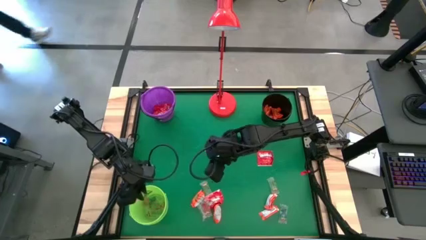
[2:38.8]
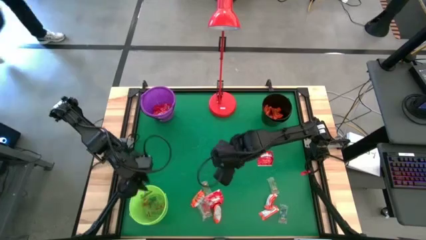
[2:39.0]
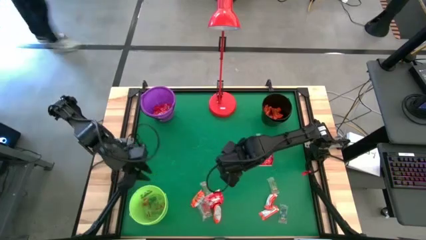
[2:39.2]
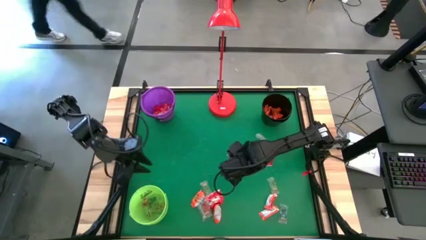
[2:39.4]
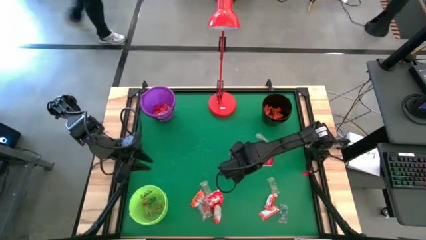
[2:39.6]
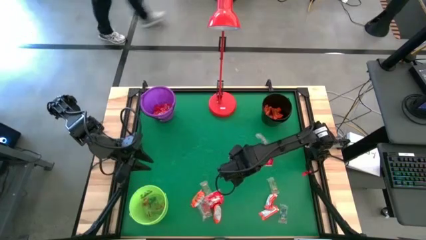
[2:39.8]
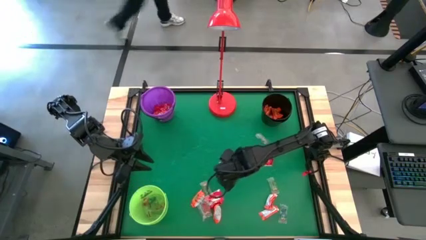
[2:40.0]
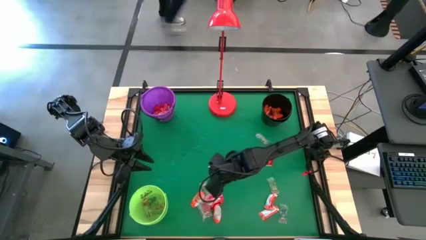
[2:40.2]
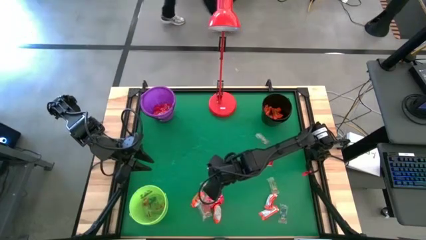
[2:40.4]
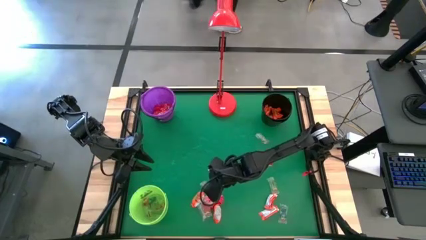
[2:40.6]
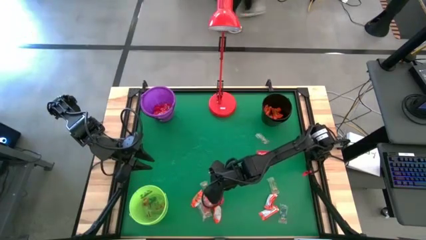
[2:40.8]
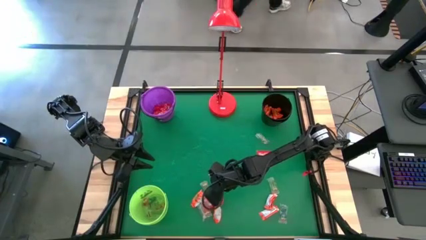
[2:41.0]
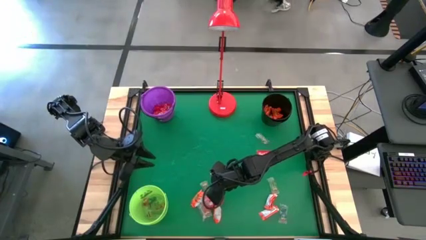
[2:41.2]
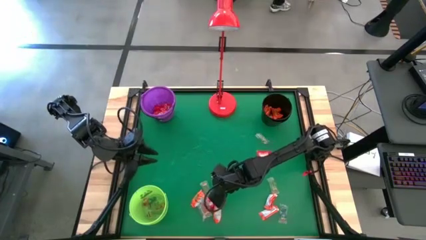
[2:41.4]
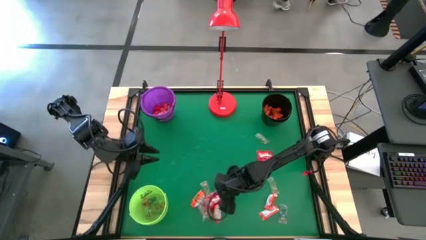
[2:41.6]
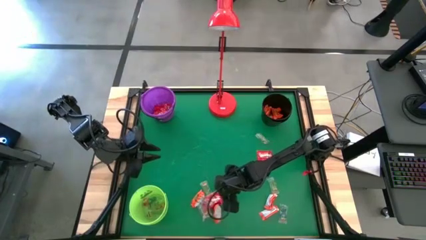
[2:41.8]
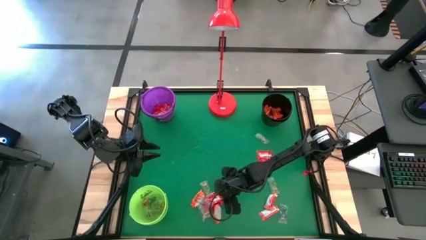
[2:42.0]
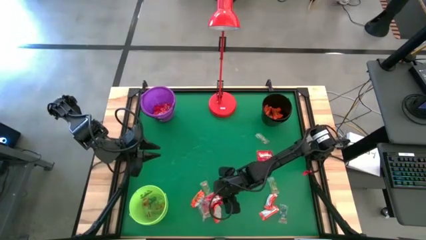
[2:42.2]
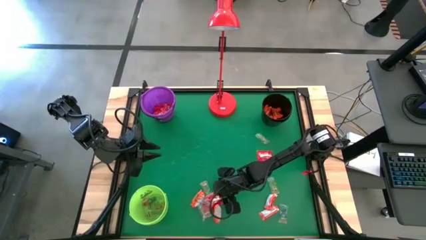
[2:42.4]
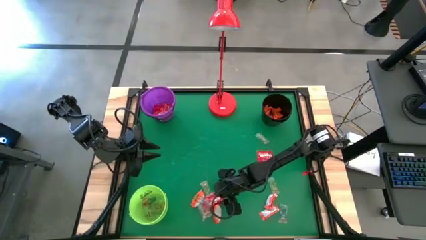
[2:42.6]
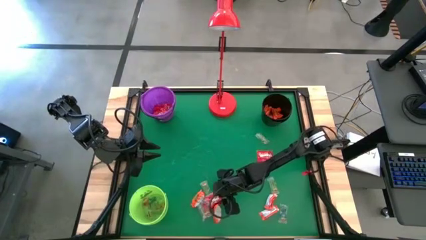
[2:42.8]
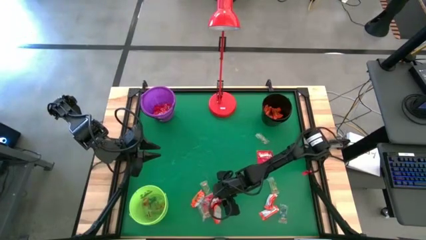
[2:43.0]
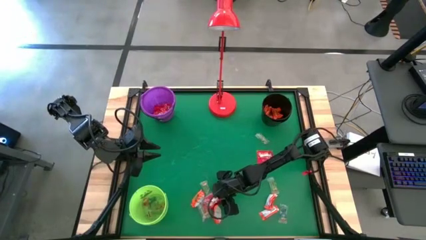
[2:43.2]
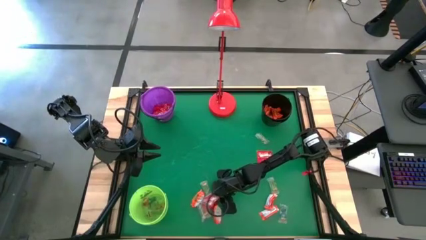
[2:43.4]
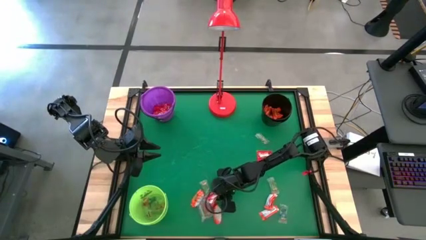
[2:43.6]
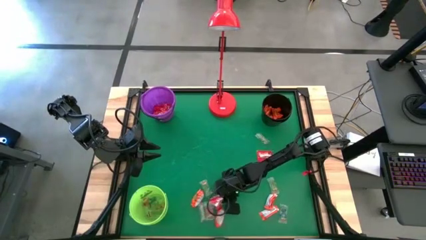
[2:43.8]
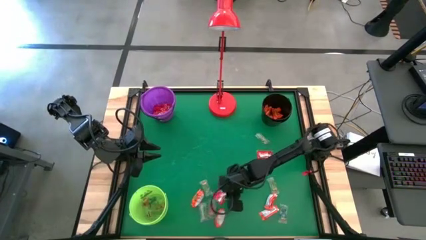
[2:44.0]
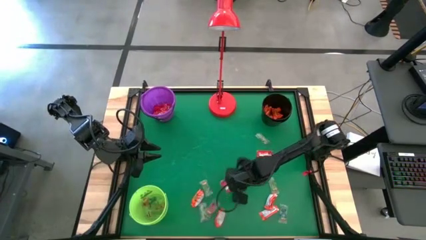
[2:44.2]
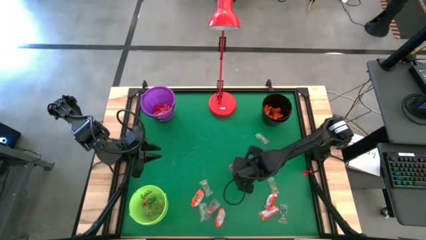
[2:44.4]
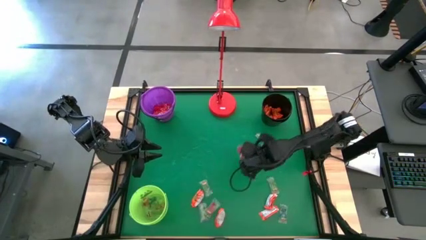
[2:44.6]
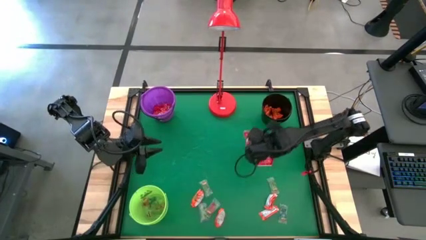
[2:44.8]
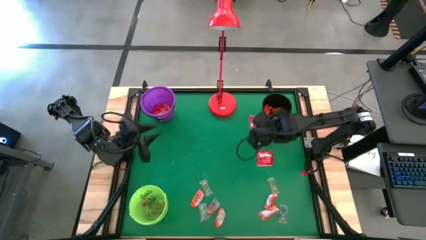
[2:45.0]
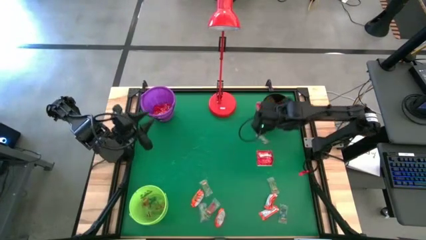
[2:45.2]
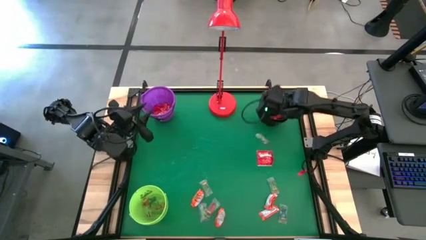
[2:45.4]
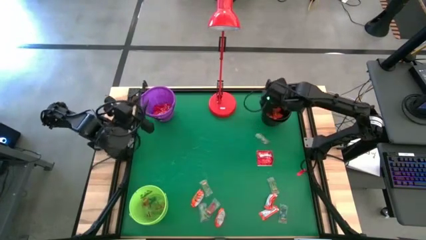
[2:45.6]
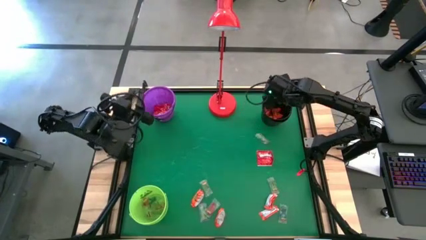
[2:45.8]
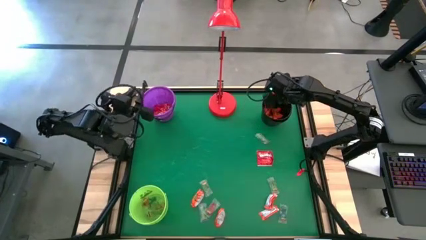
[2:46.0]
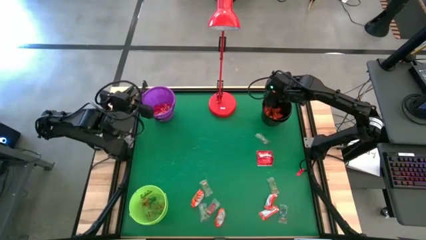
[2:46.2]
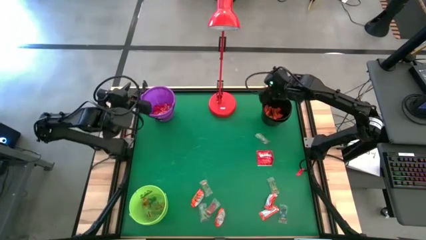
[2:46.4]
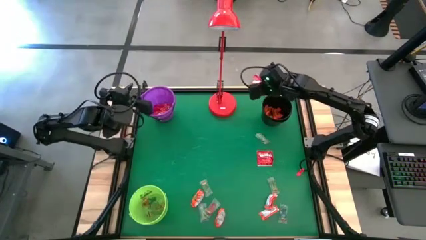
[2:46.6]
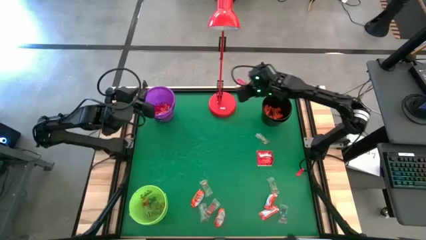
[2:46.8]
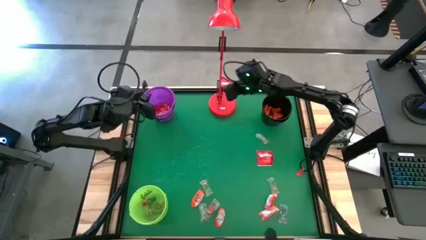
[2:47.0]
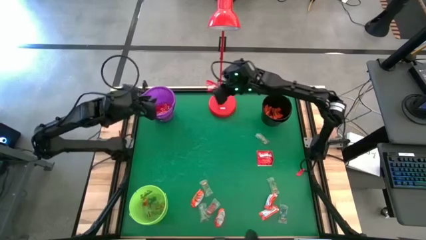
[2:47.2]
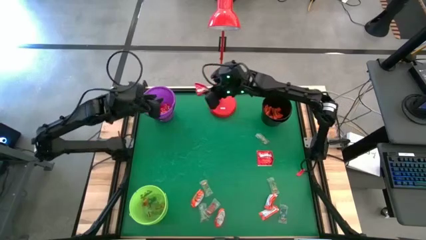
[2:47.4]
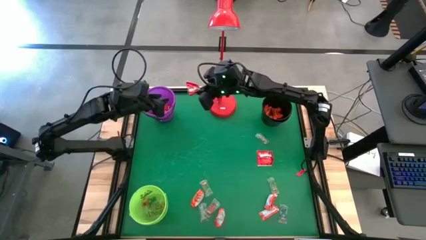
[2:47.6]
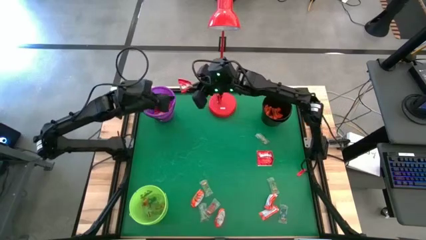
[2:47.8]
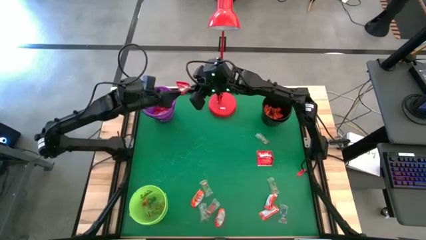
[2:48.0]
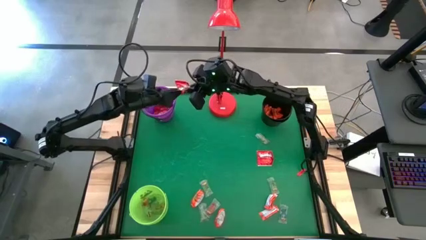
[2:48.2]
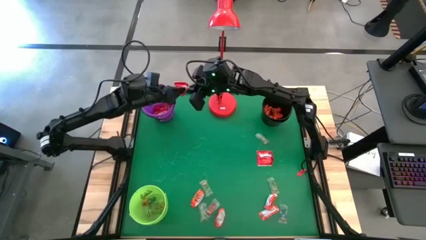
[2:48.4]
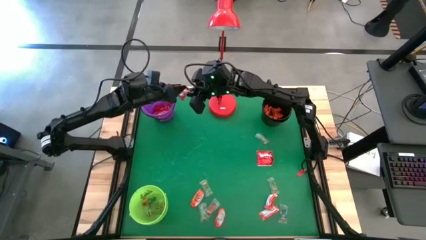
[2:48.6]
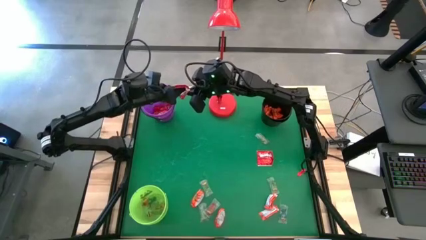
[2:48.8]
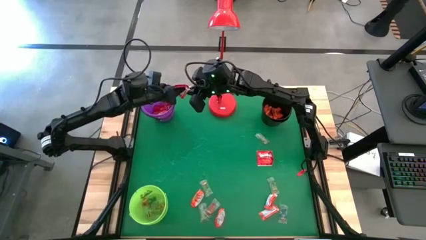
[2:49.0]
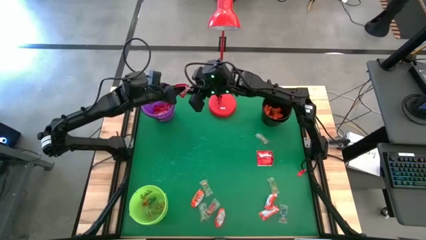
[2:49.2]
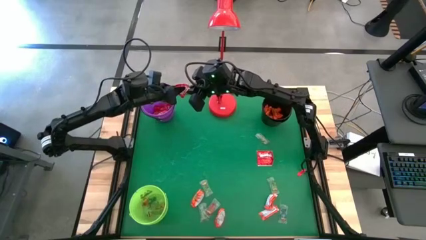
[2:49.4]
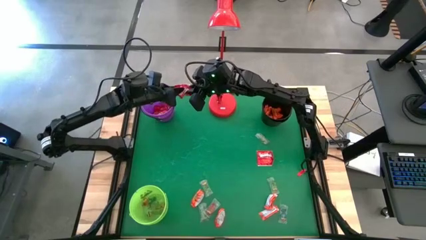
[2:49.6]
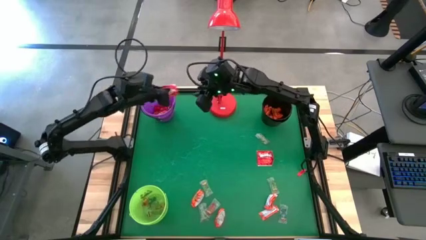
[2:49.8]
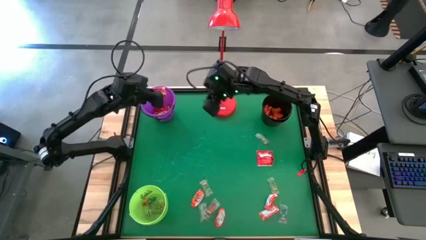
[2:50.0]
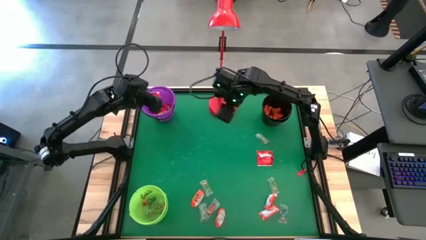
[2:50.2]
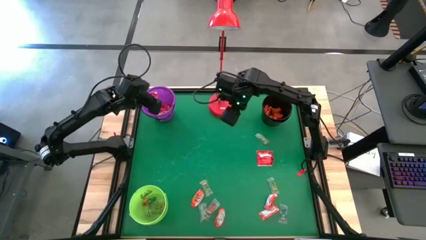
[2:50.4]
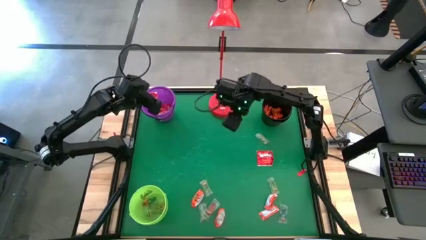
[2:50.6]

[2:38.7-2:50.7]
Task: Sort candy
Put the red candy into the violet bucket

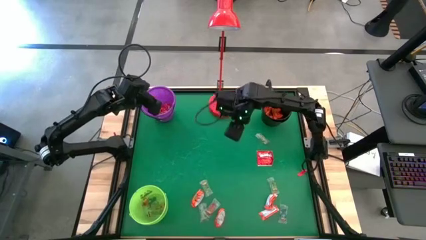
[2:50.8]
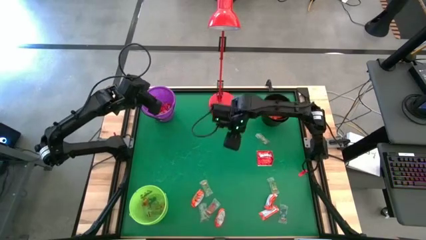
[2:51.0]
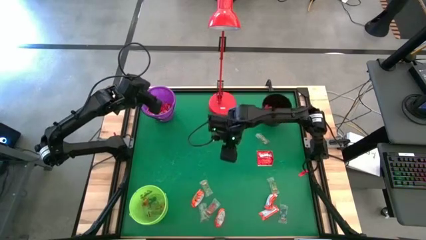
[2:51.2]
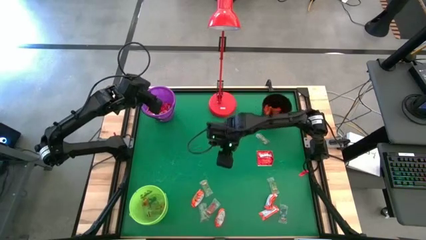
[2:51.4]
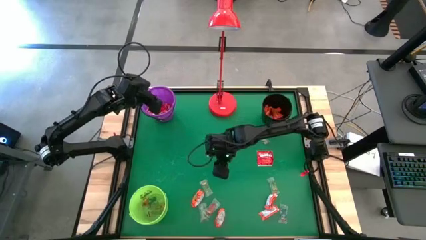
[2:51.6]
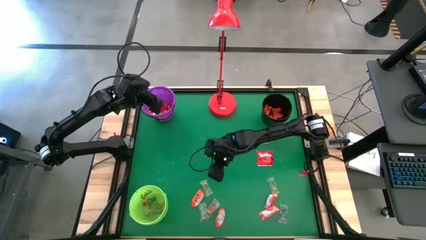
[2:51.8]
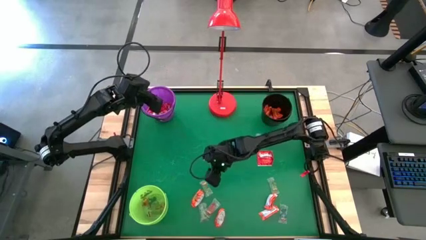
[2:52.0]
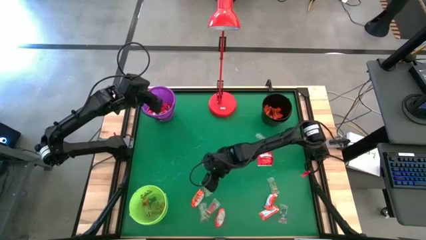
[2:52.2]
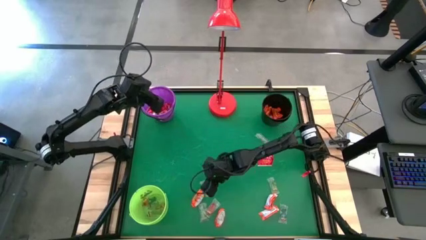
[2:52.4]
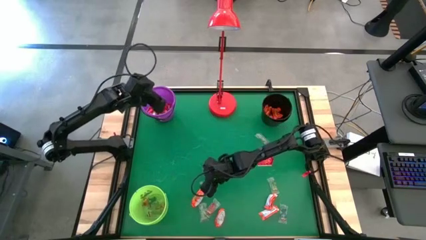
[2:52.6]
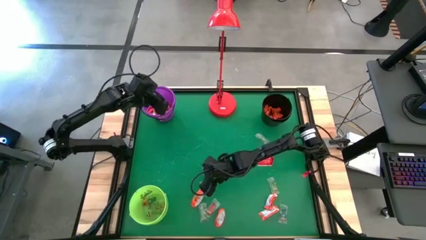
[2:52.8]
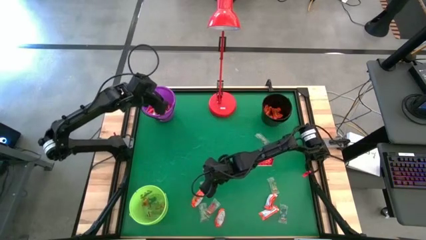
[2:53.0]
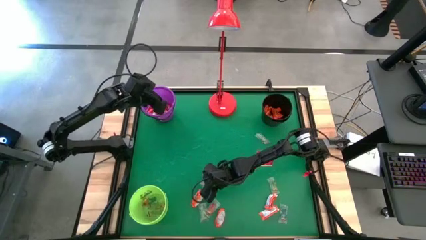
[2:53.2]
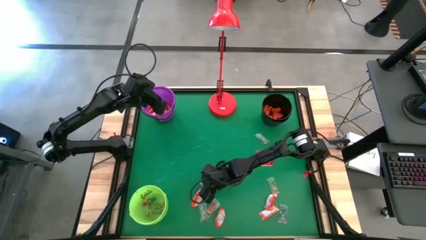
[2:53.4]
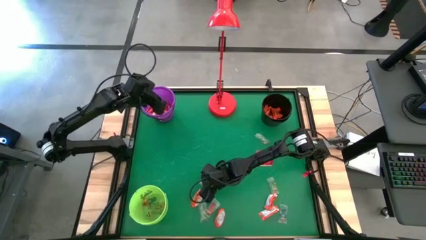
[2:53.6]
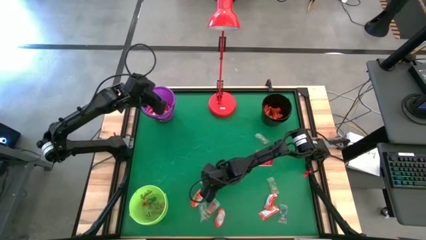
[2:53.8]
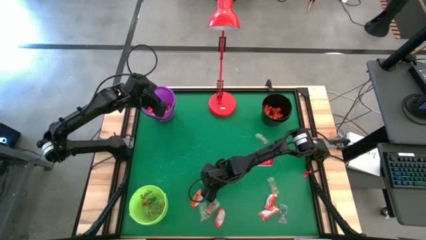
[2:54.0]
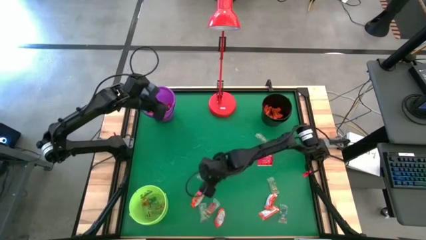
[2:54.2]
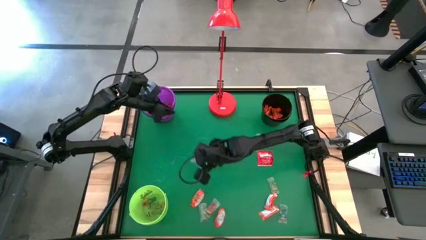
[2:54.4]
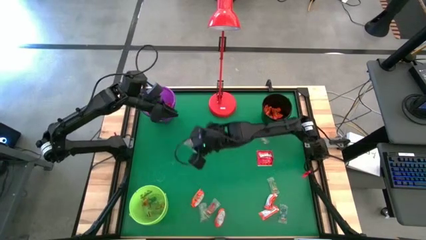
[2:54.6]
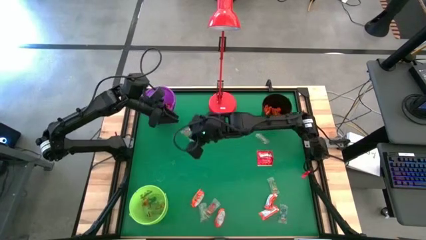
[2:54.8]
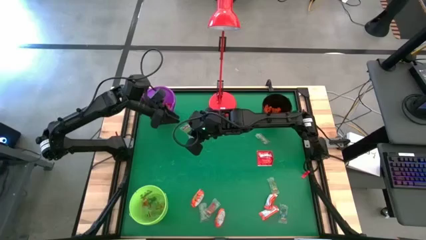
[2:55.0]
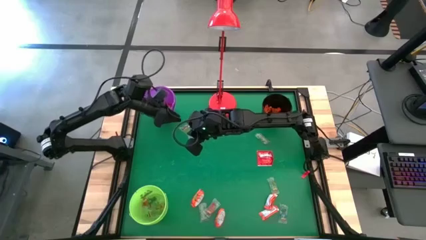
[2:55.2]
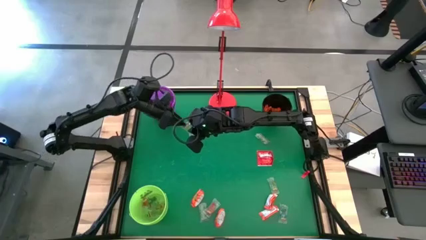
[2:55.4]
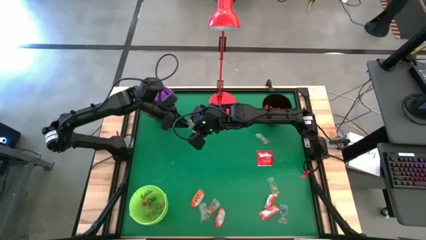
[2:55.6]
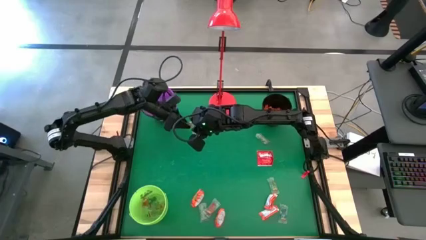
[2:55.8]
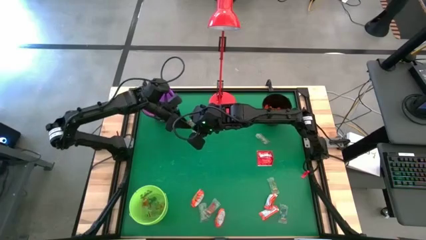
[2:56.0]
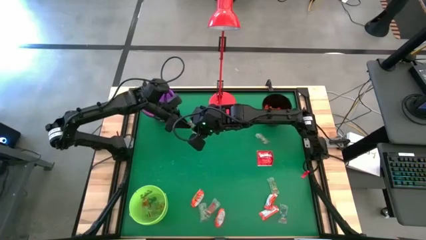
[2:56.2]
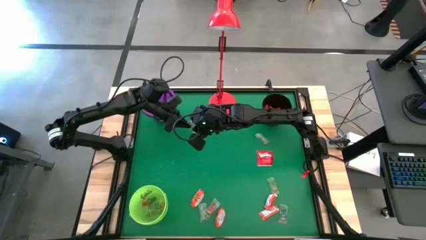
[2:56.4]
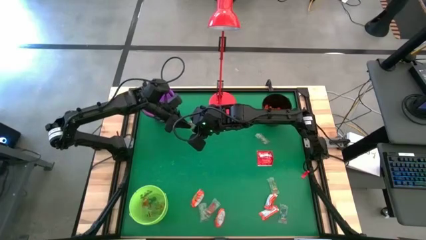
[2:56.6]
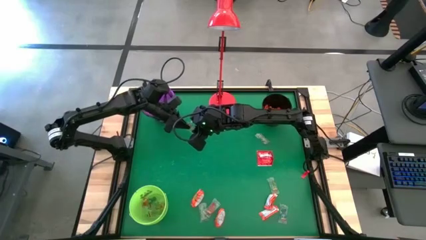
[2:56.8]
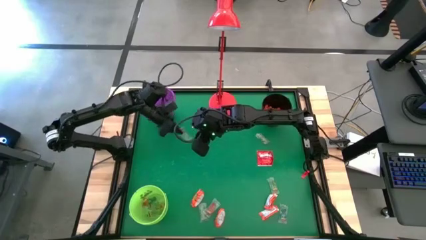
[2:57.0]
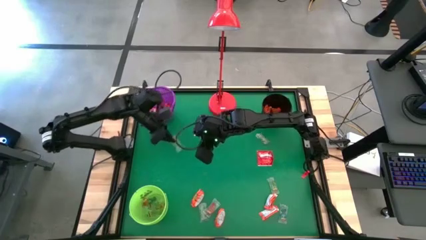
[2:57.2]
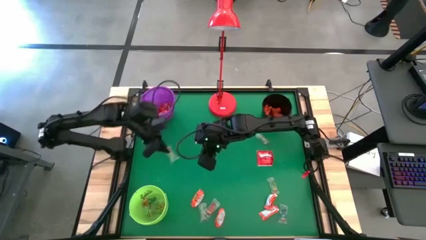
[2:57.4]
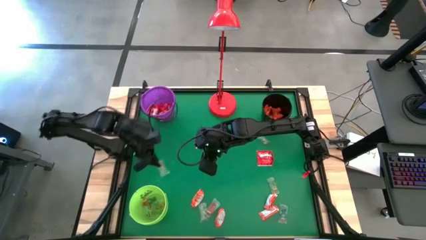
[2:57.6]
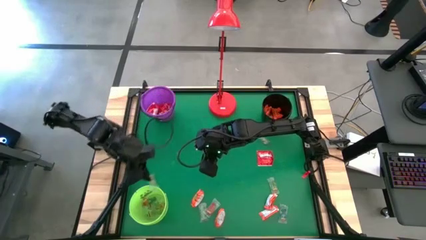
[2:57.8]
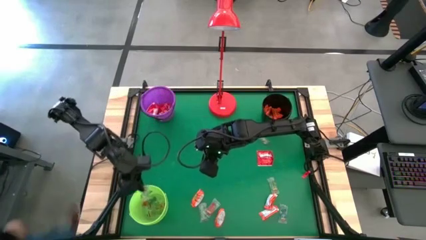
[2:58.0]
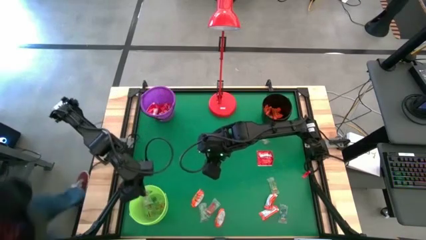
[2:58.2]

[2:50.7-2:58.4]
Put the green gummy into the light green bucket
